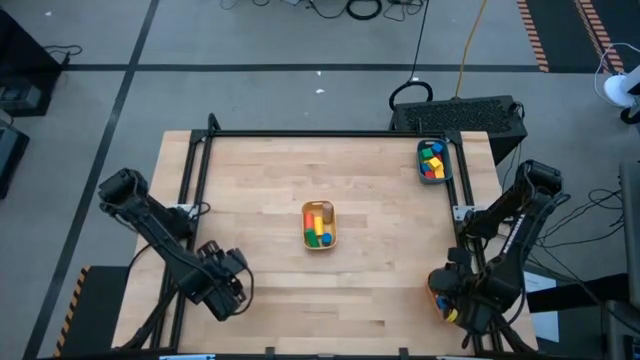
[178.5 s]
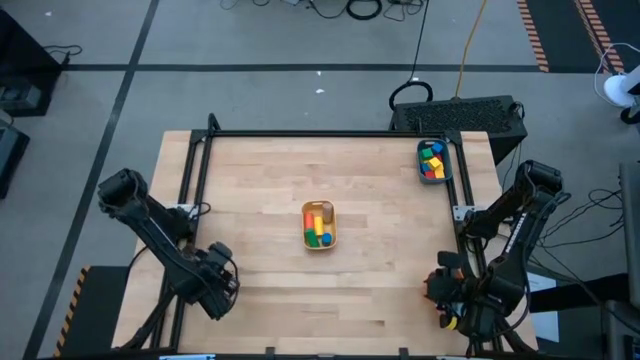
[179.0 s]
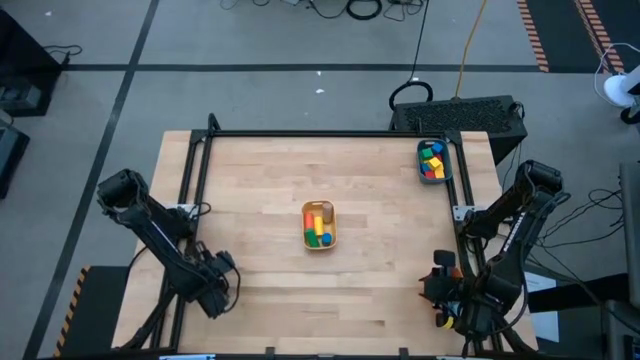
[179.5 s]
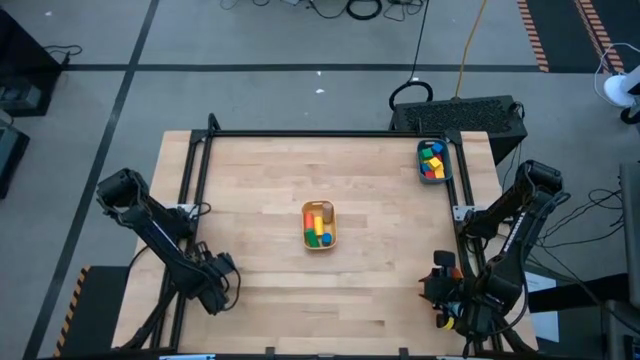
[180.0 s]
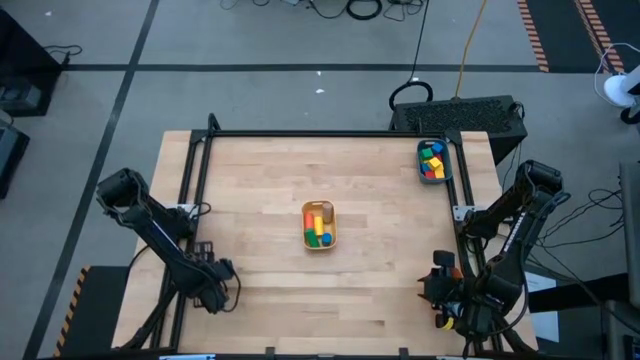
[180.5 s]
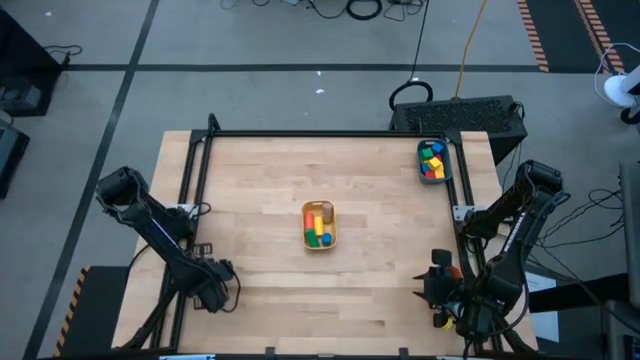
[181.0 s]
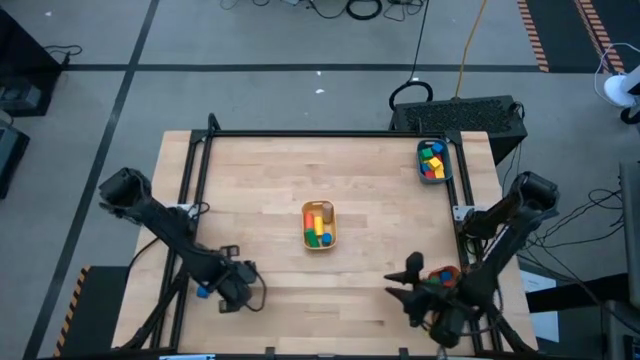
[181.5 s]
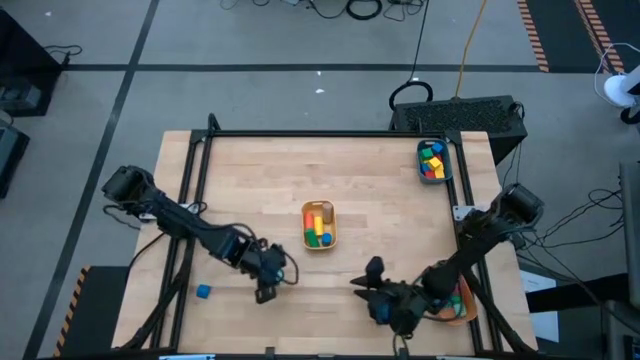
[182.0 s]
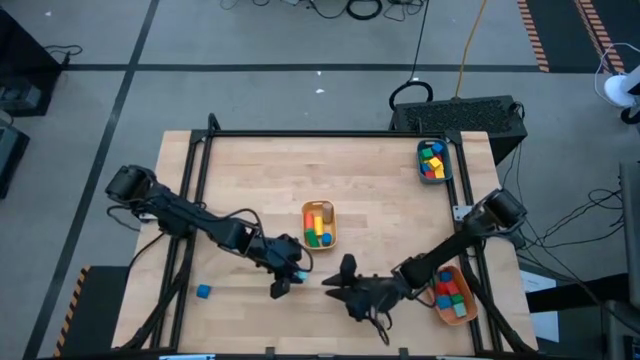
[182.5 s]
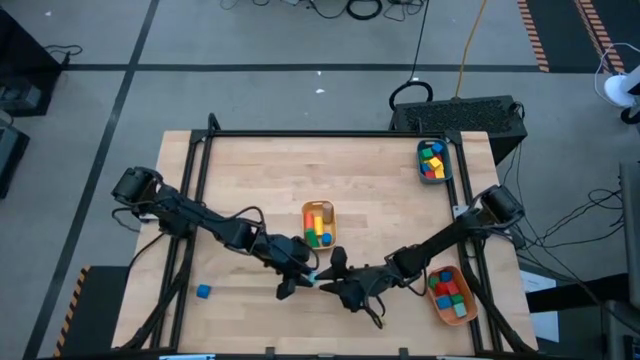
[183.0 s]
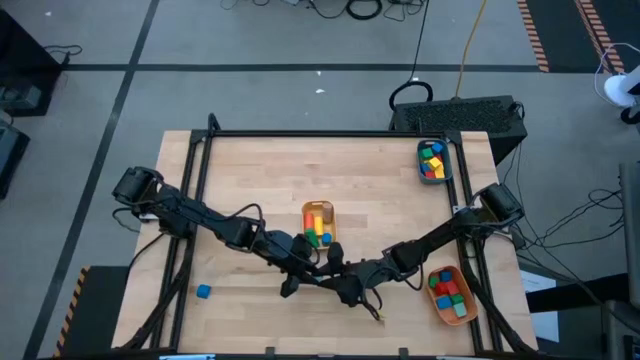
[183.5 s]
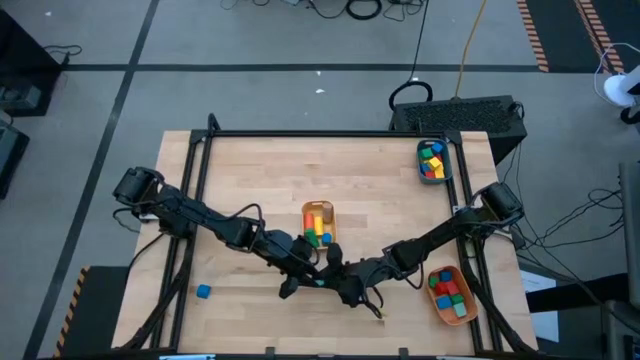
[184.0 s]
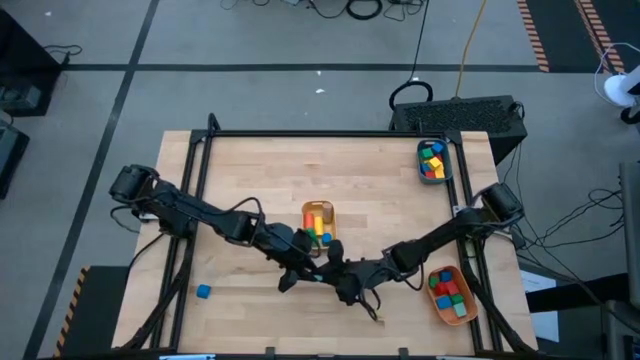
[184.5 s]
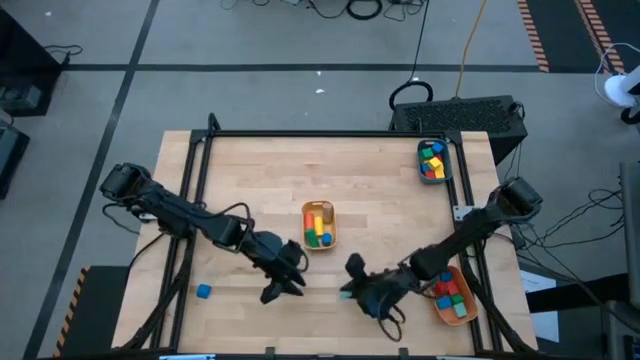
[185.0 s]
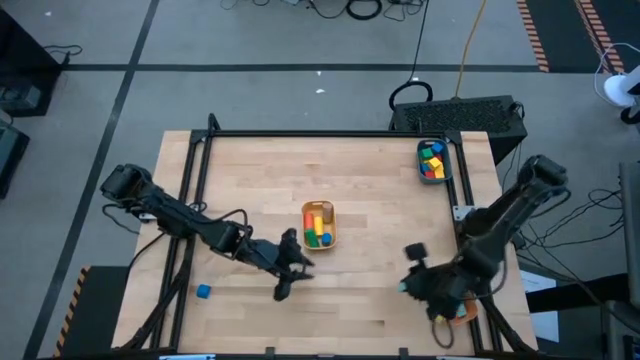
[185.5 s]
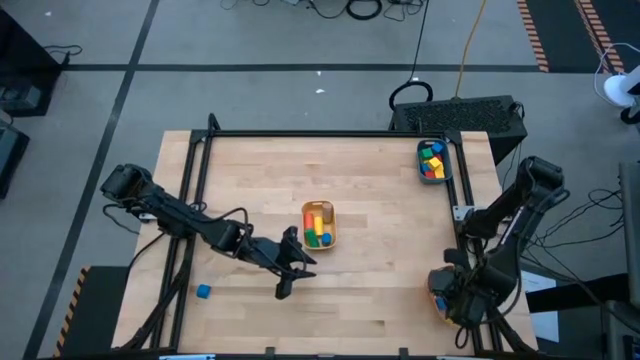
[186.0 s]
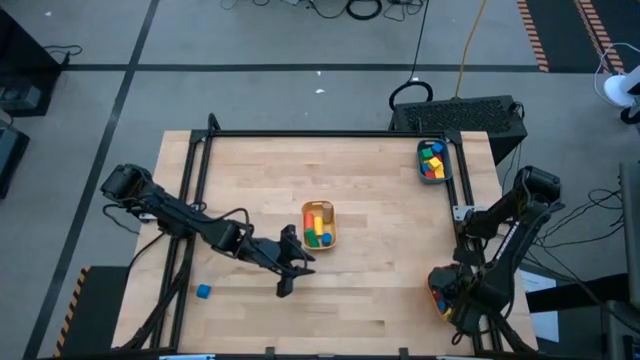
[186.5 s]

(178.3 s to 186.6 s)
Task: Sort blocks by size
Put the light blue half-circle block into the orange bin

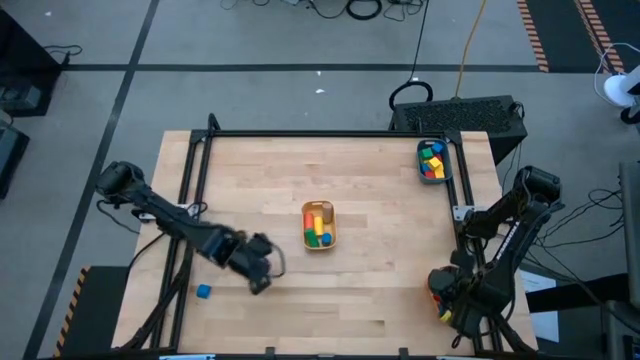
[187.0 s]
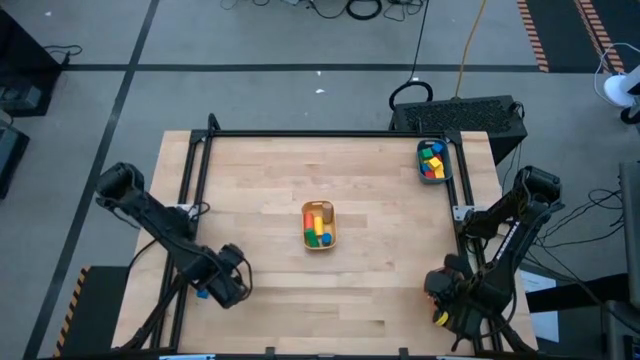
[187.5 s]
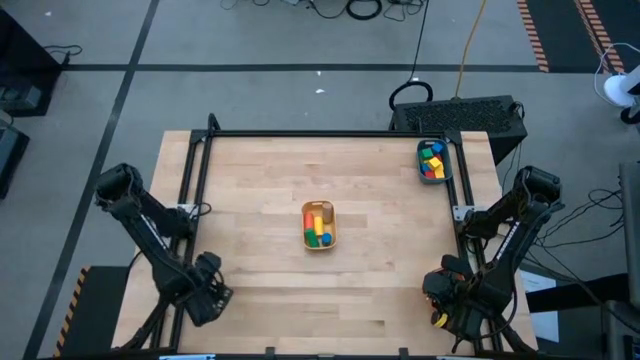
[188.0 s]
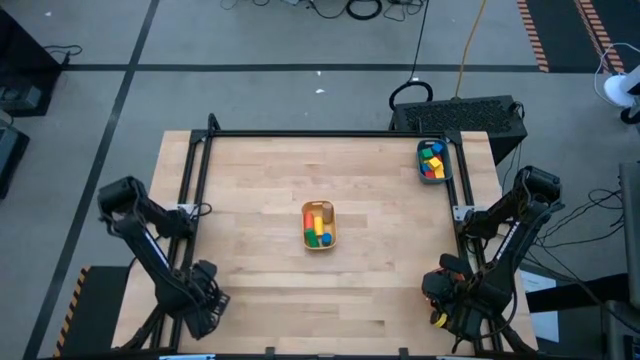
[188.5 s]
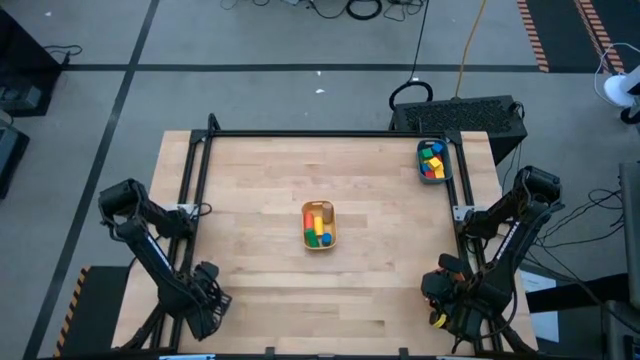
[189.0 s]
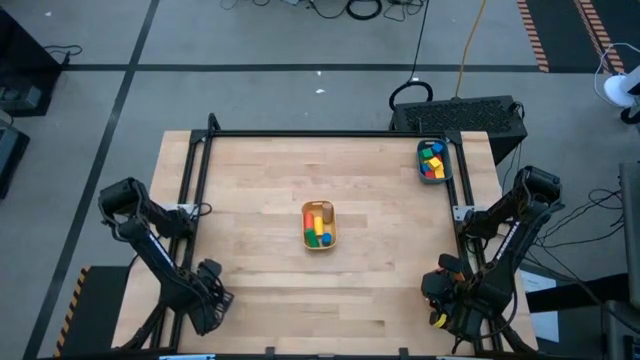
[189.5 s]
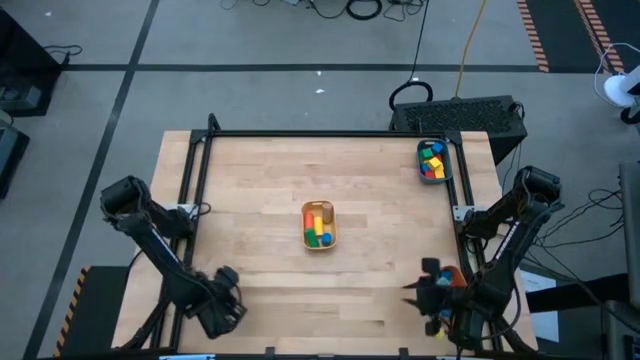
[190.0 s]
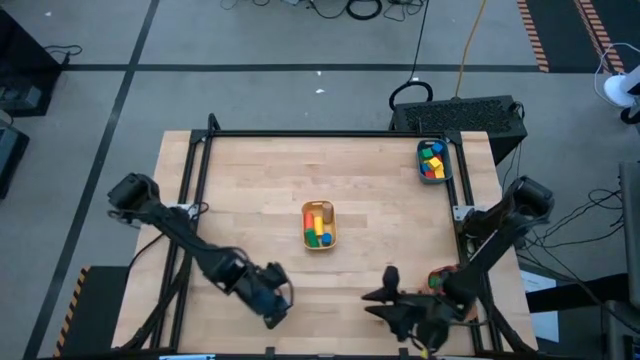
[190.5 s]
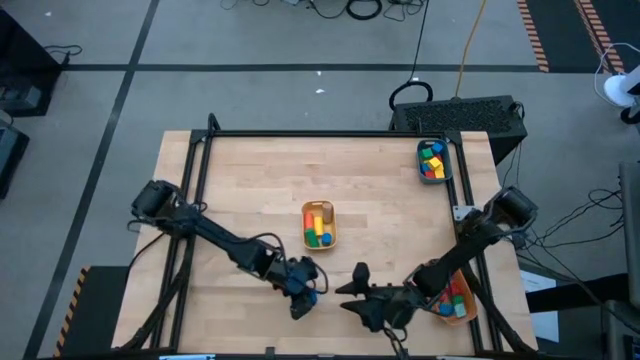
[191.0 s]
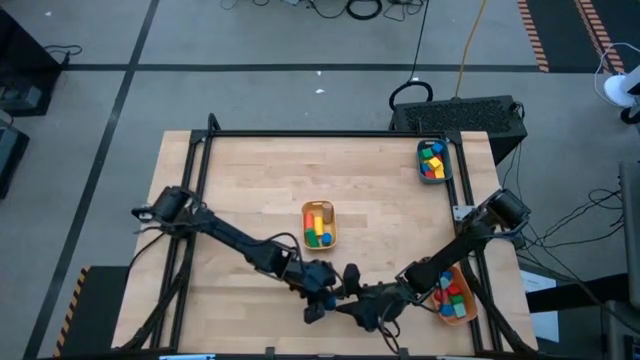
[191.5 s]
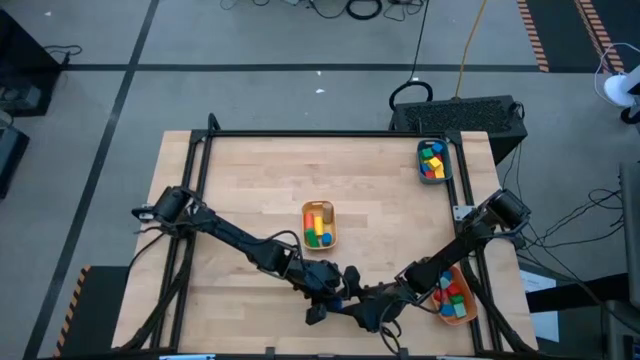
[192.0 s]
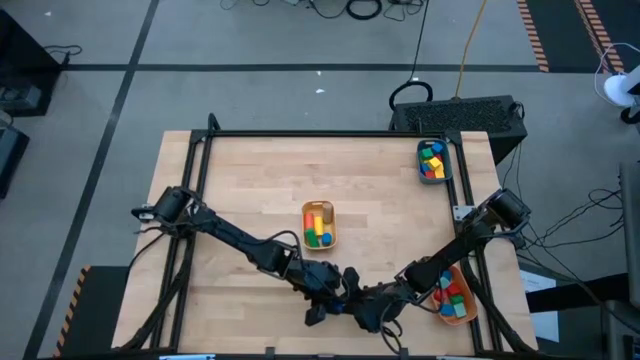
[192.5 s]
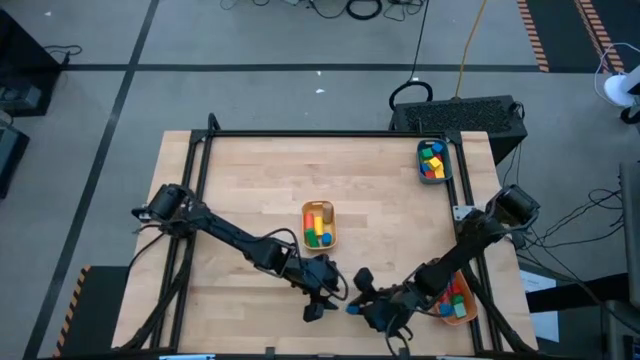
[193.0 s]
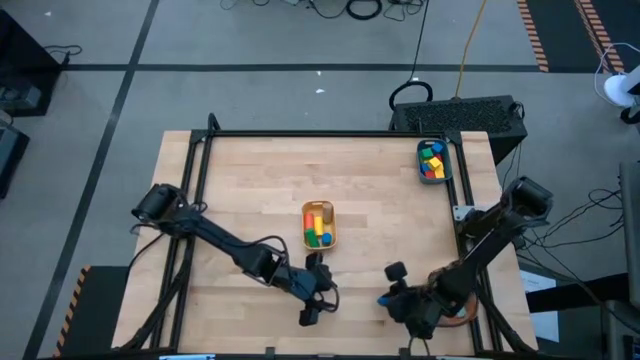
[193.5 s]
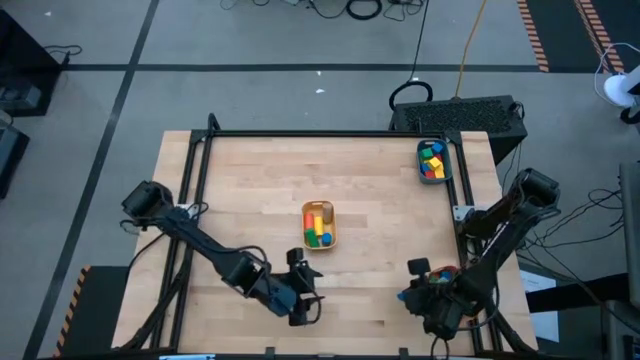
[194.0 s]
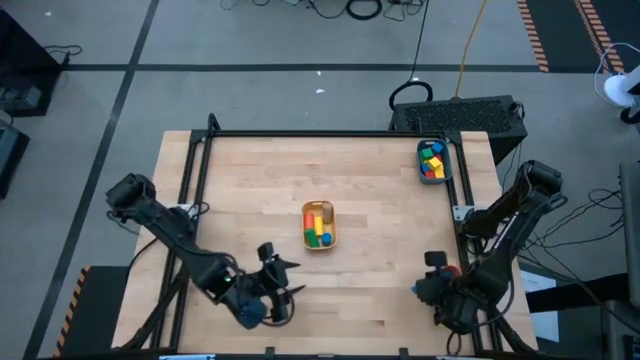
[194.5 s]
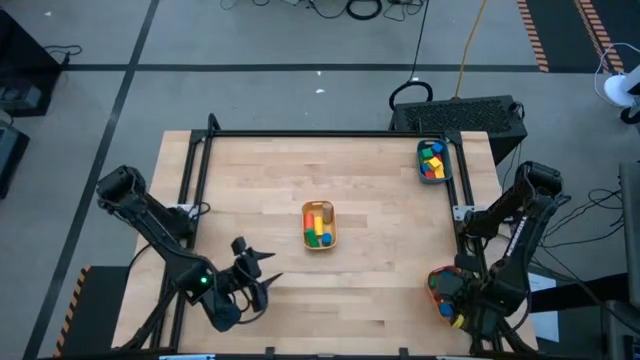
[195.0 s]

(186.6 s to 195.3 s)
Put the blue half-circle block into the orange bin

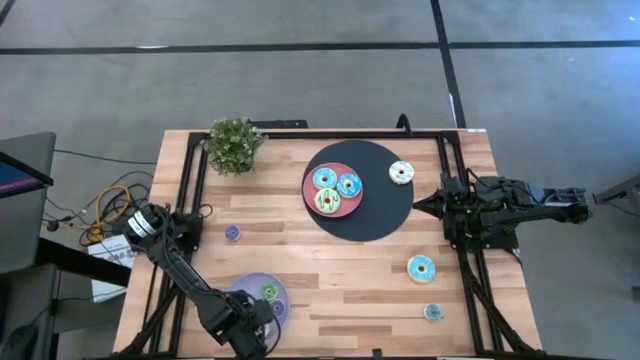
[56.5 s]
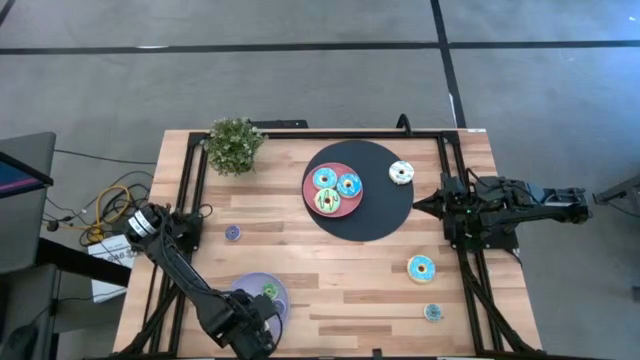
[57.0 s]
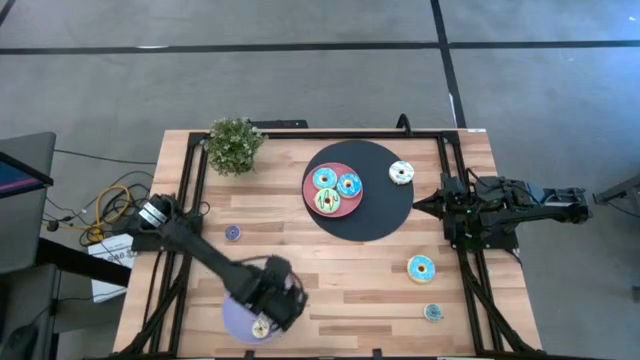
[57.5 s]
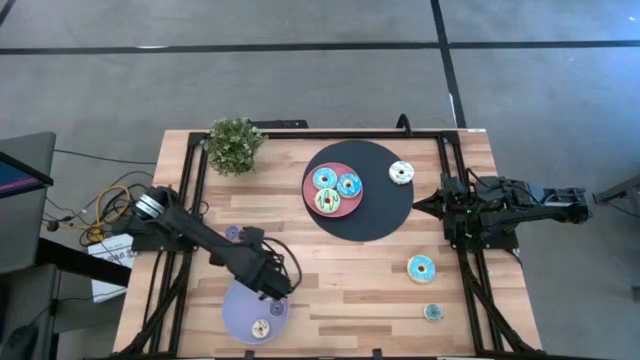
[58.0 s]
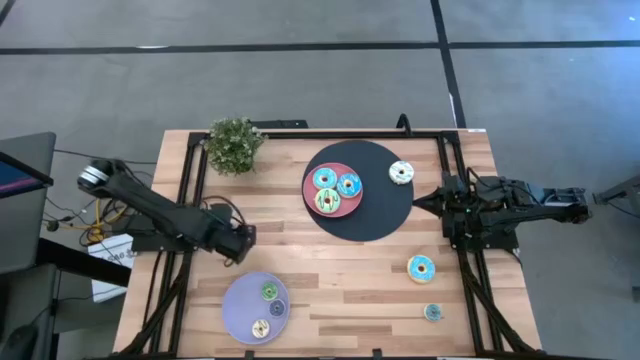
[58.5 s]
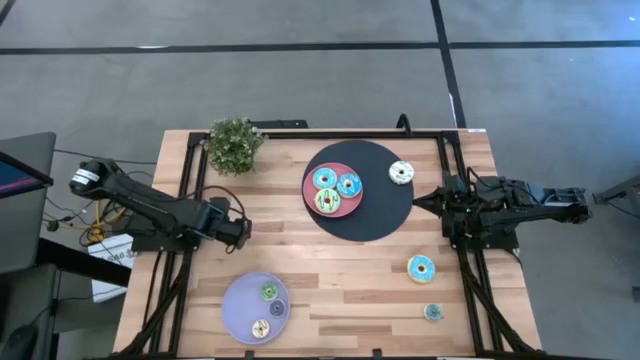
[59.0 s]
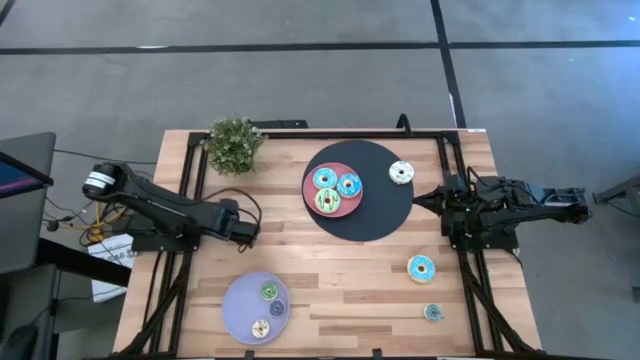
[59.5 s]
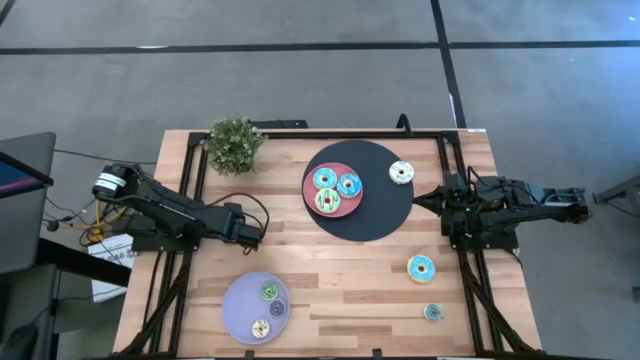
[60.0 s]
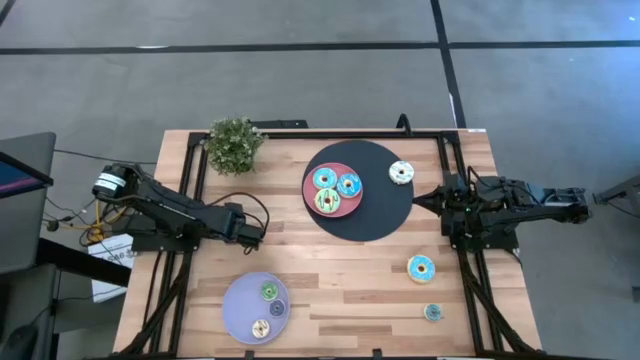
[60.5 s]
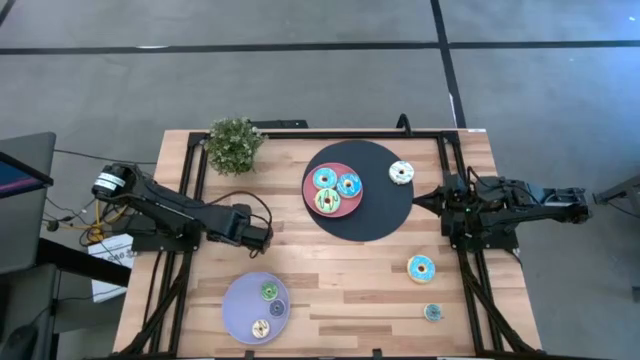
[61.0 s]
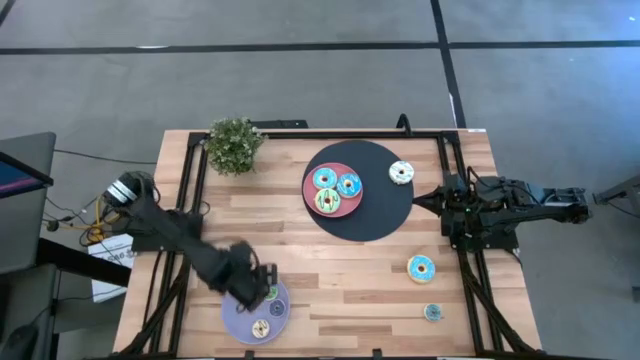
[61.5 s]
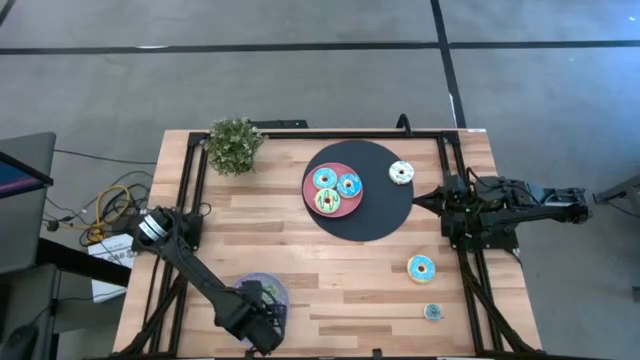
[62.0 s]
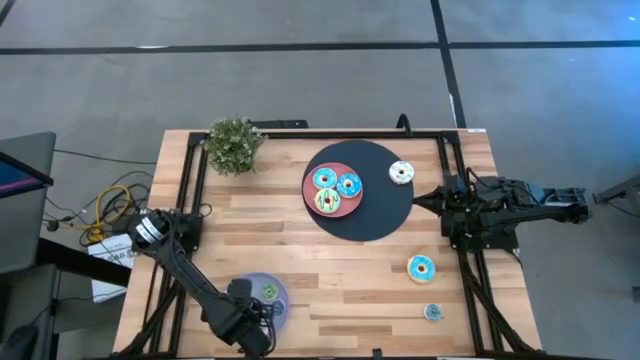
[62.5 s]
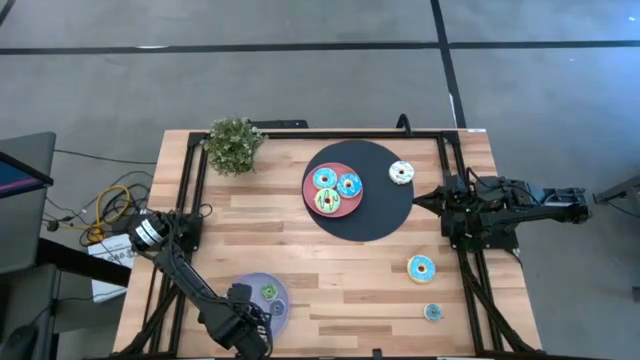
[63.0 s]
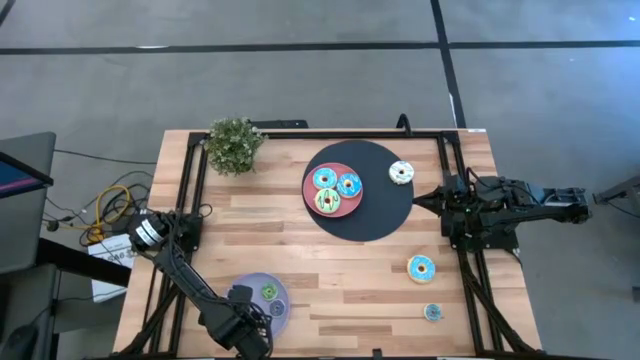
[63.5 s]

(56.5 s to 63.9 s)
Task: Pick & Place donuts
Put the small dark blue donut on the purple plate
